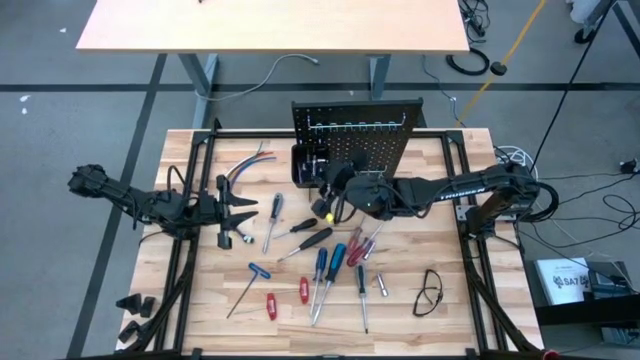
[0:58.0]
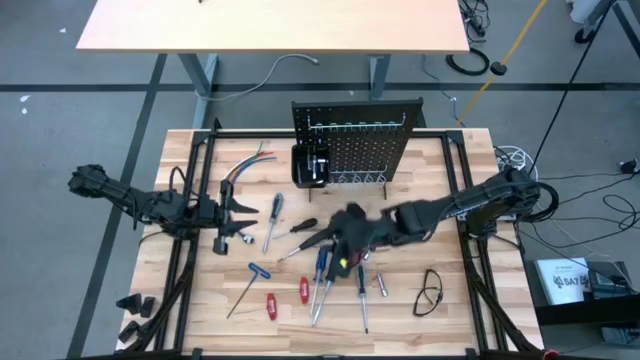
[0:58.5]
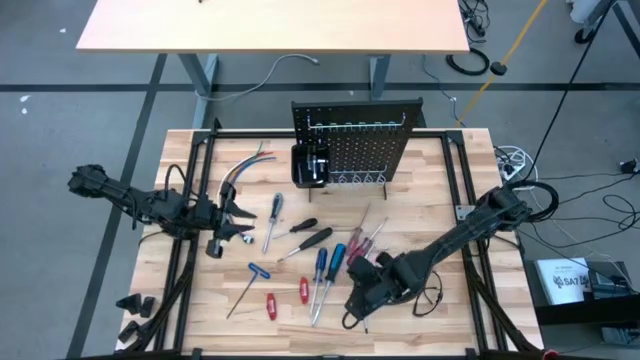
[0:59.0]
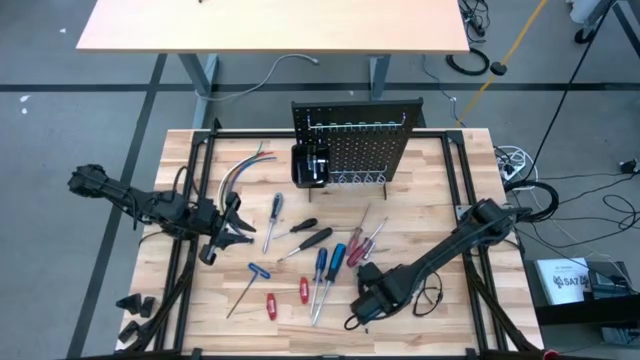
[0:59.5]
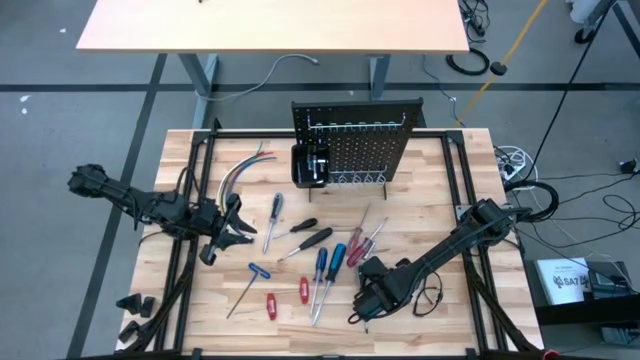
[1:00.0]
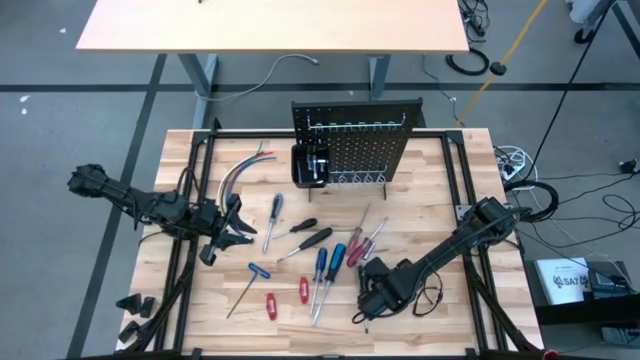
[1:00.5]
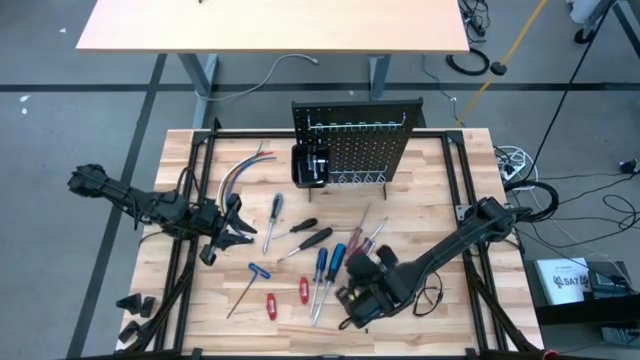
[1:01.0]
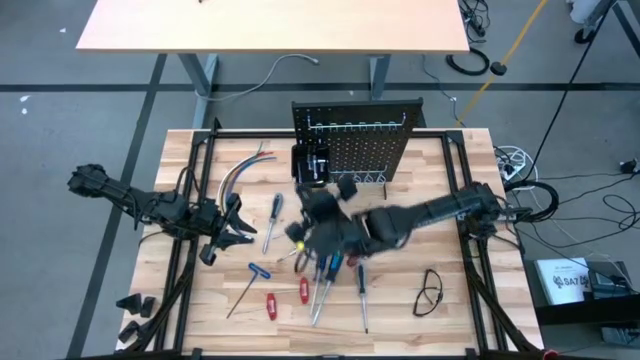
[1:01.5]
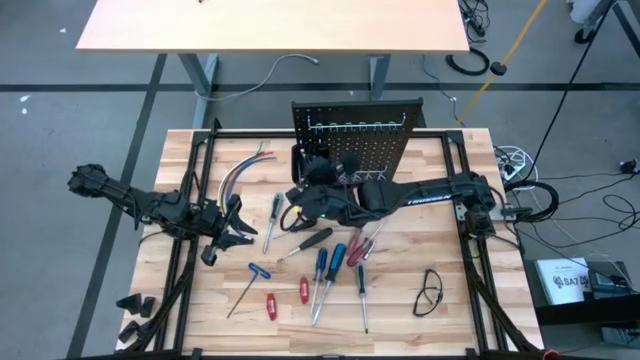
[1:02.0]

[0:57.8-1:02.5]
Task: Hang tools onto peg board
Put the extension bar in the black bin on the peg board

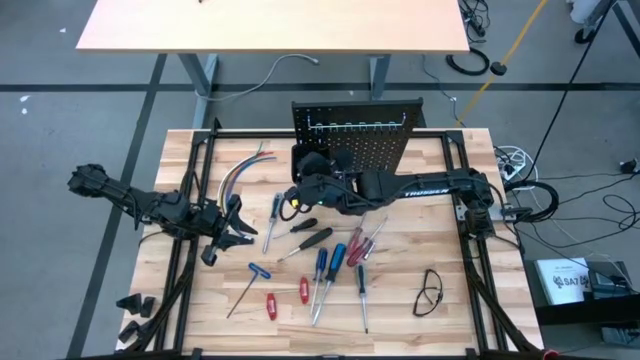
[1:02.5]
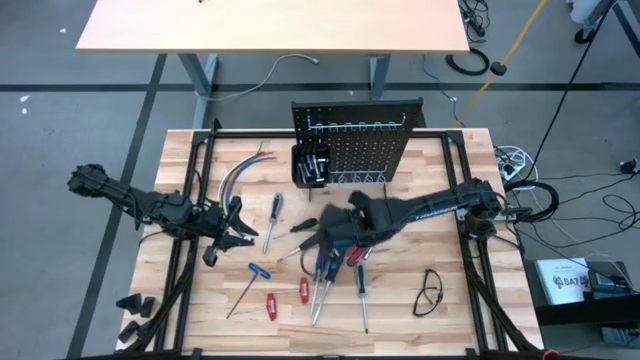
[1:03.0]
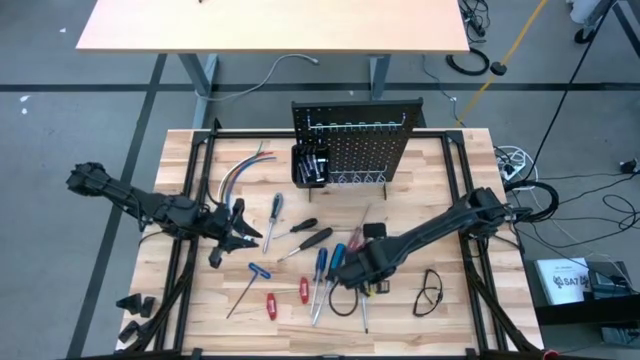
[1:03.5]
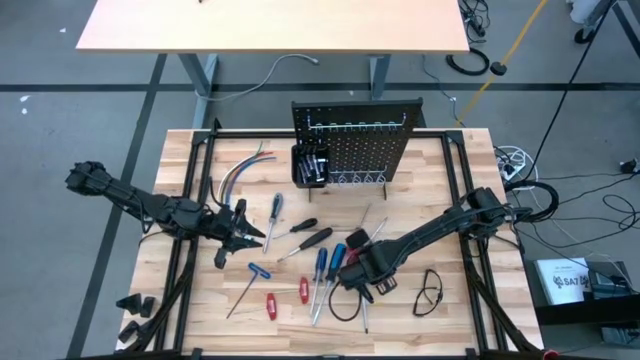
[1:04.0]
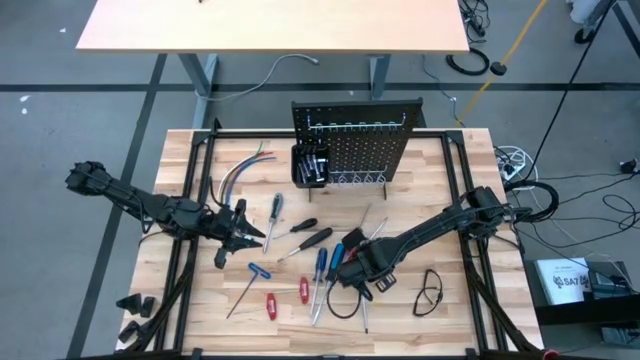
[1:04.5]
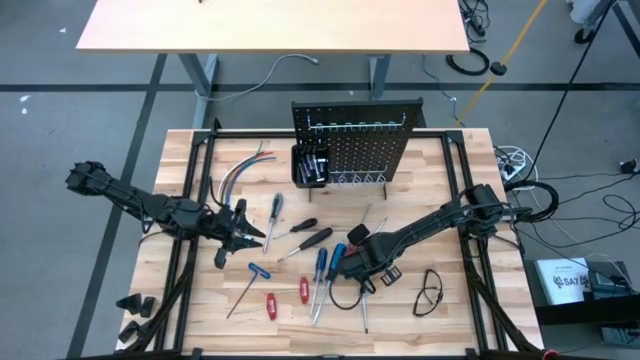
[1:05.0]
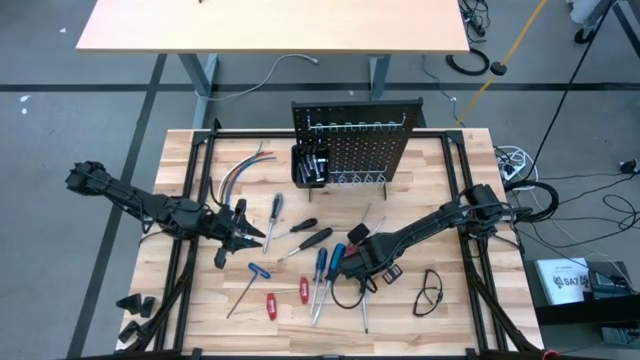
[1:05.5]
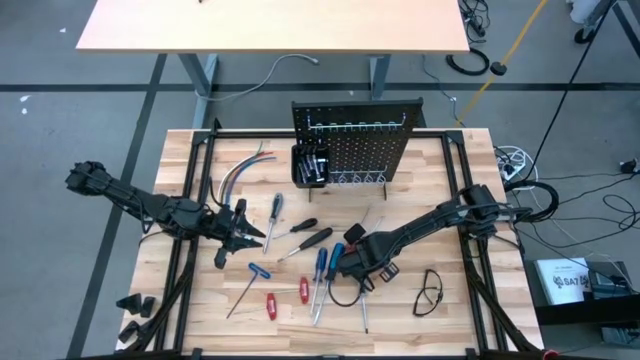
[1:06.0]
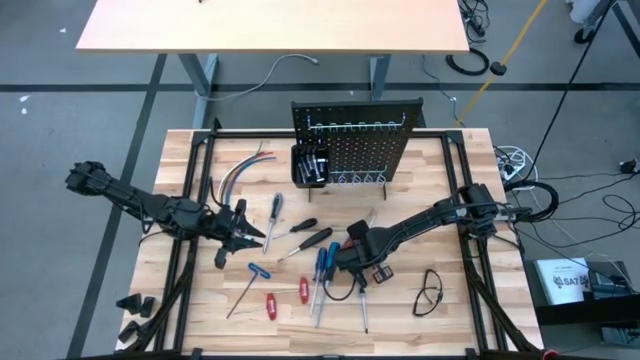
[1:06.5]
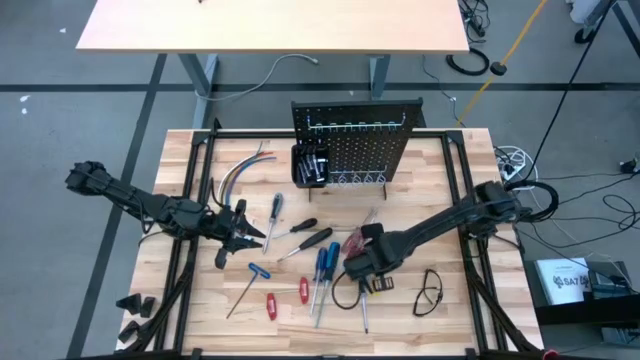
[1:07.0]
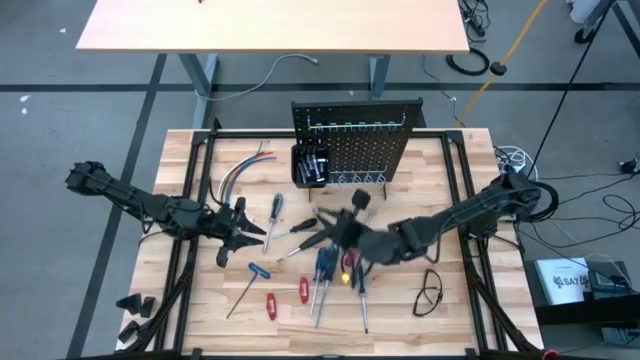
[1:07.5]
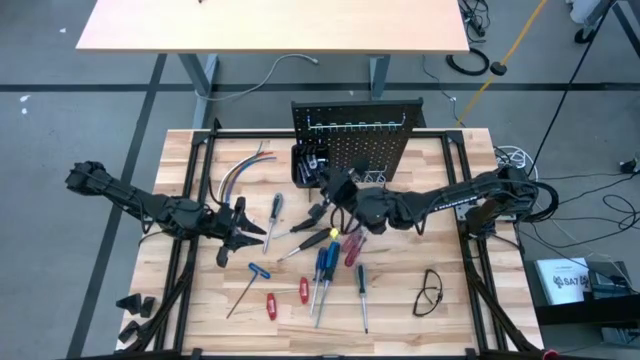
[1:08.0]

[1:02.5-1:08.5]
Put the extension bar in the black bin on the peg board

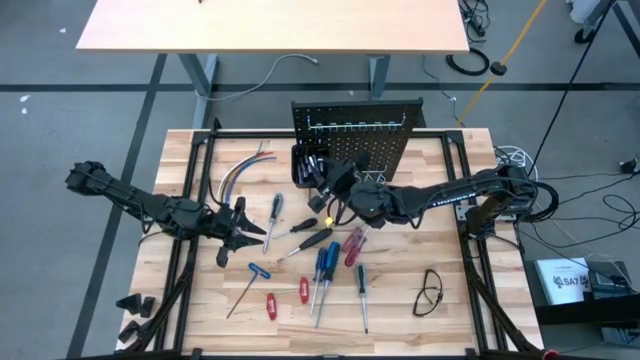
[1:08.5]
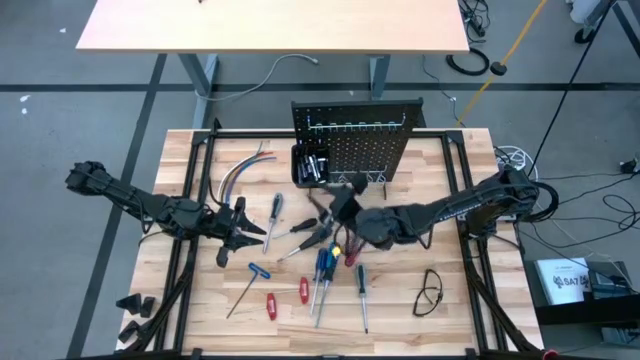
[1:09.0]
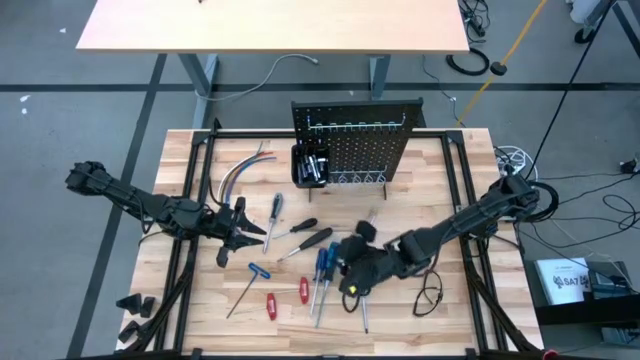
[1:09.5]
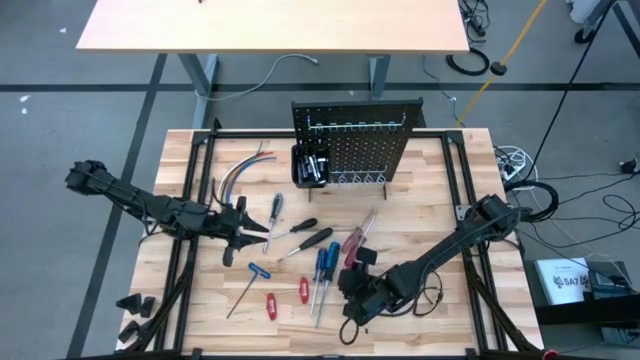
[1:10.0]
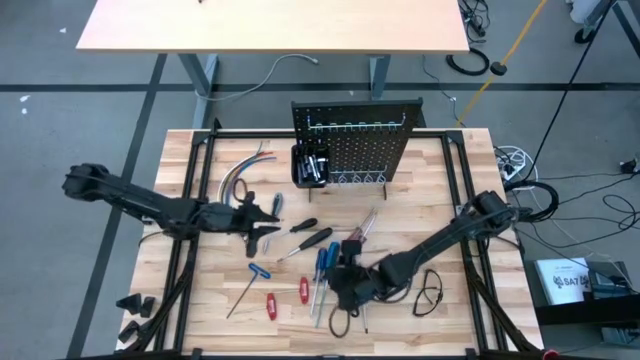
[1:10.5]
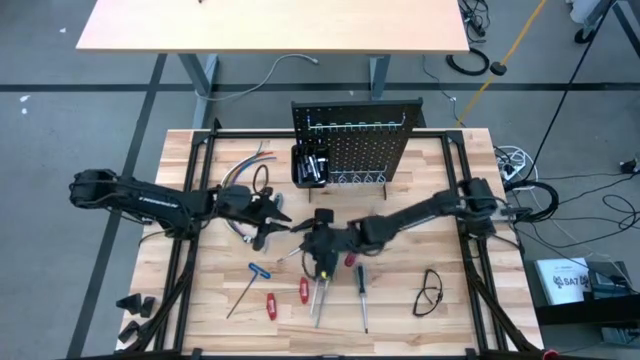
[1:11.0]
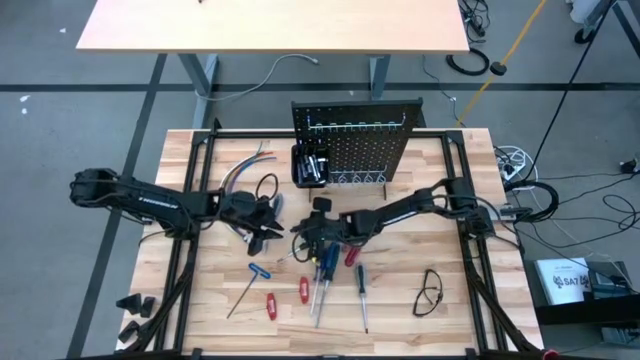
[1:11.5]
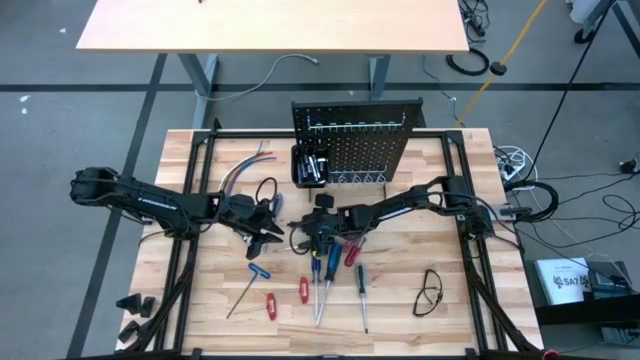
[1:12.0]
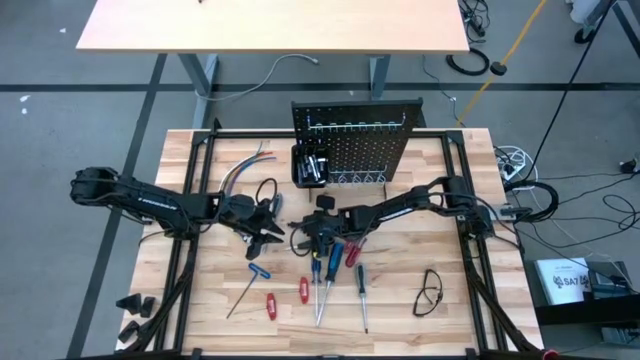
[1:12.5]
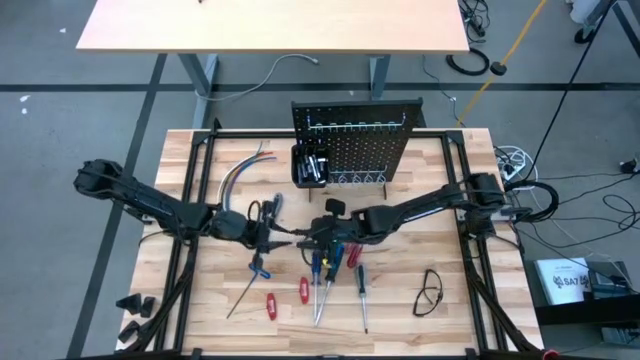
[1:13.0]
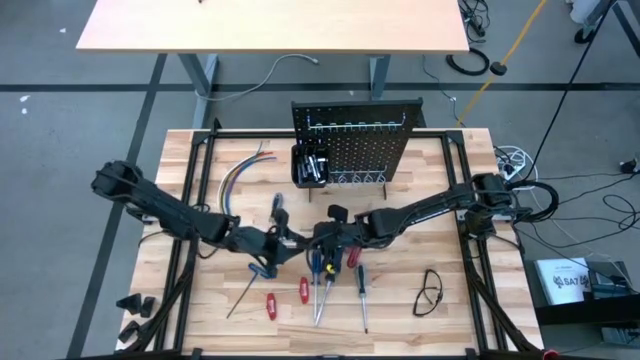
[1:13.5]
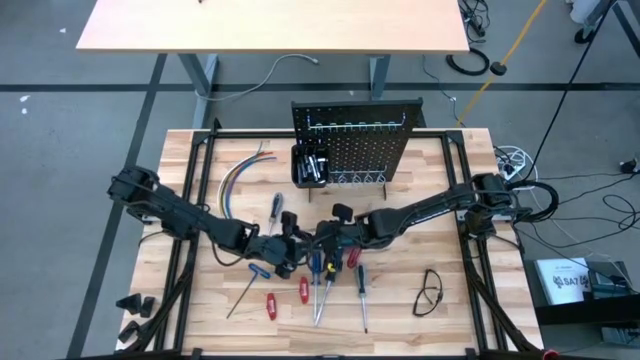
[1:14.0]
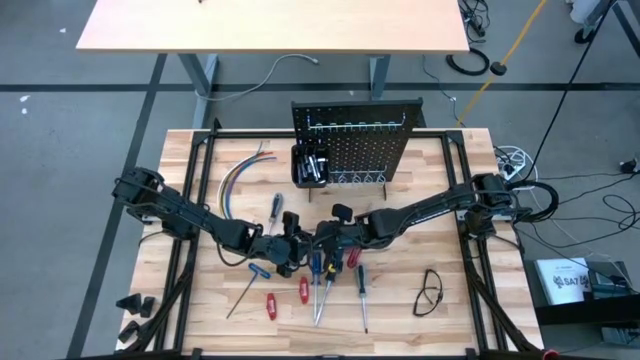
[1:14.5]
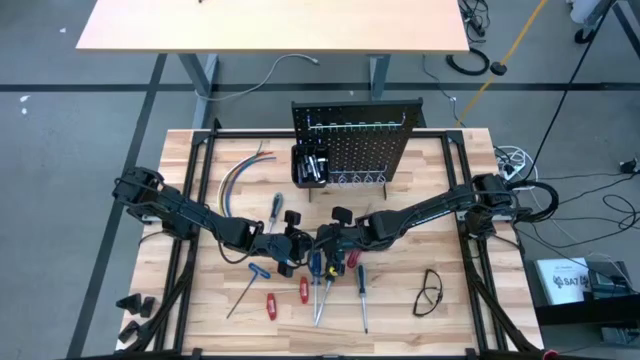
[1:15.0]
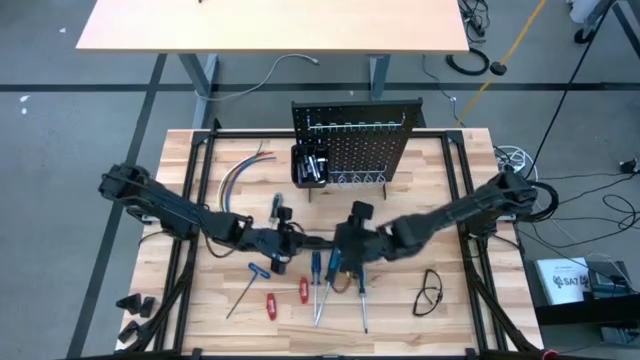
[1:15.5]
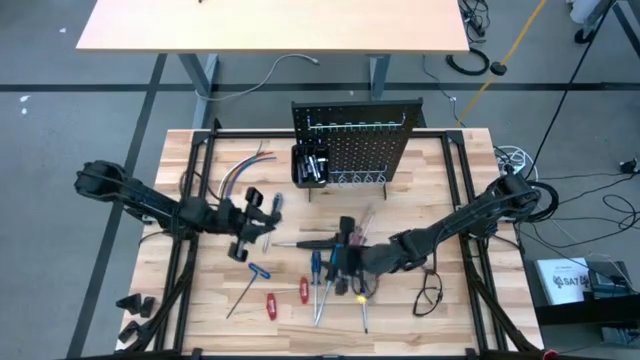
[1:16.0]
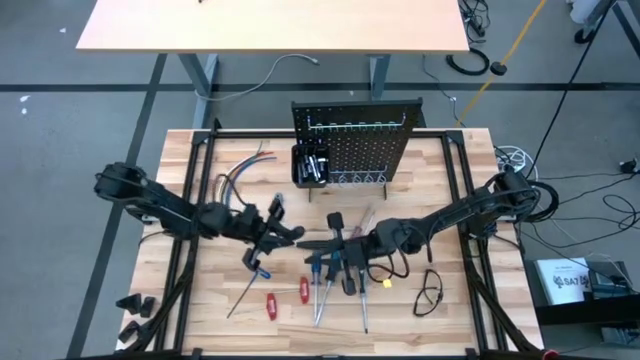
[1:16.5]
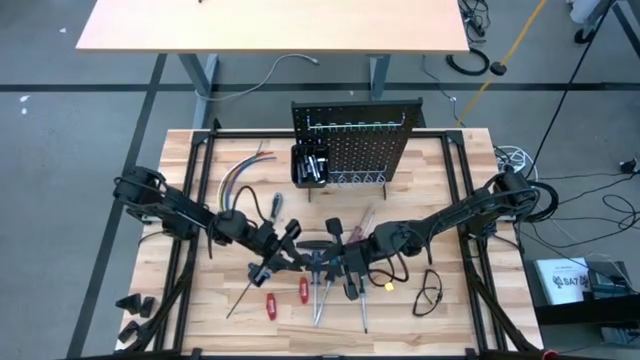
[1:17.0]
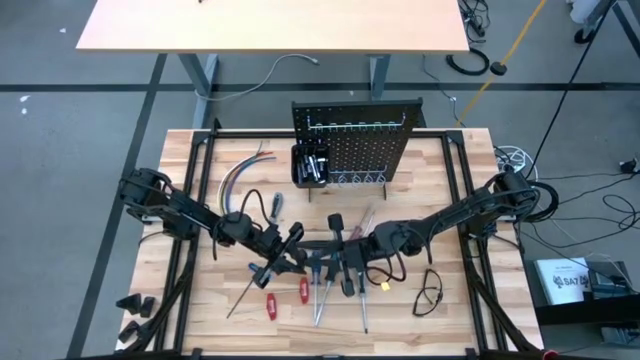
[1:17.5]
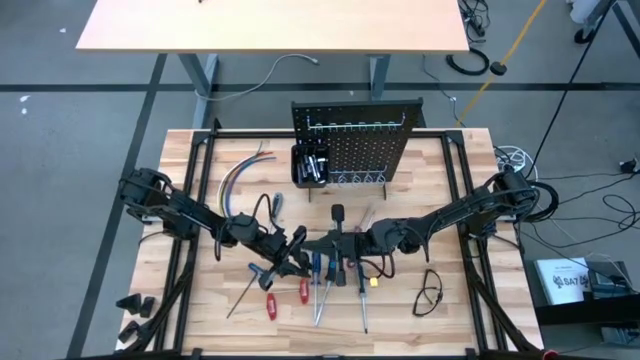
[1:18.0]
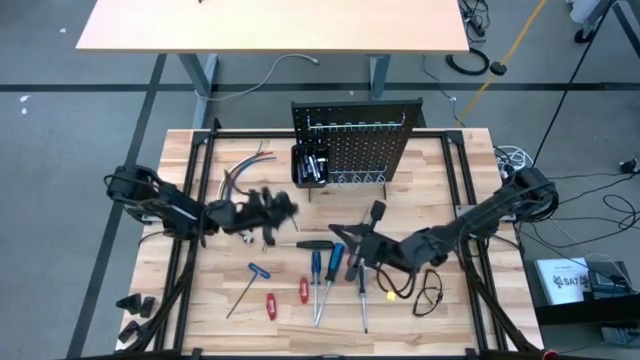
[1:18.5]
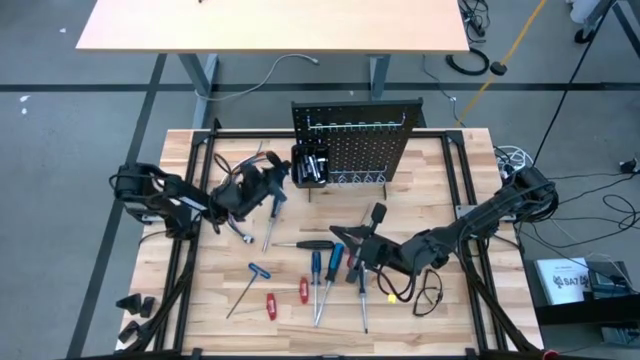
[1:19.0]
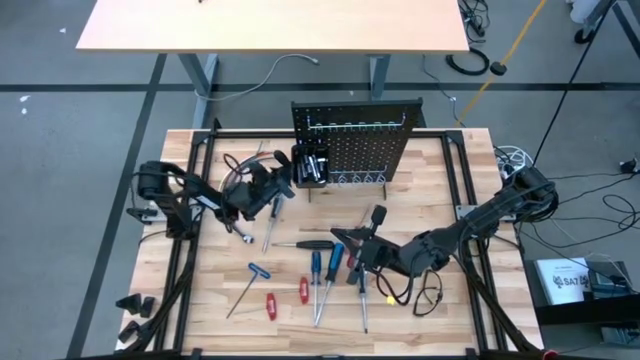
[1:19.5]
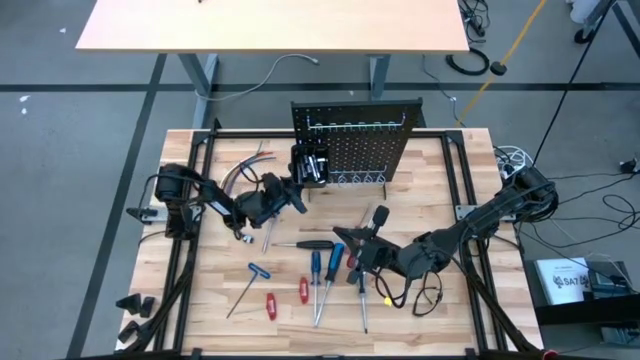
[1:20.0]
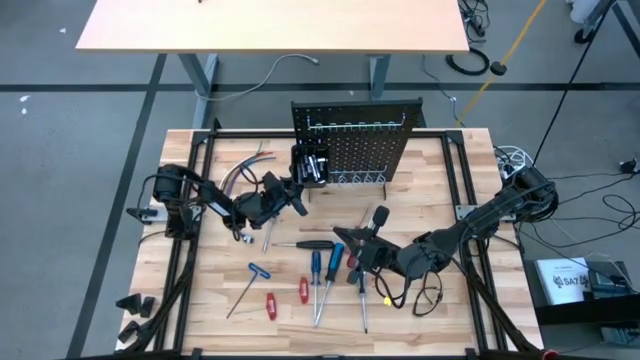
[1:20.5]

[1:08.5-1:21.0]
Hang the black screwdriver on the peg board
